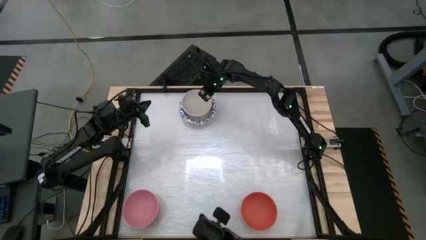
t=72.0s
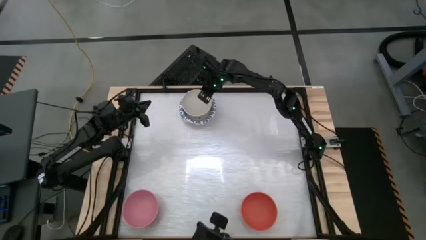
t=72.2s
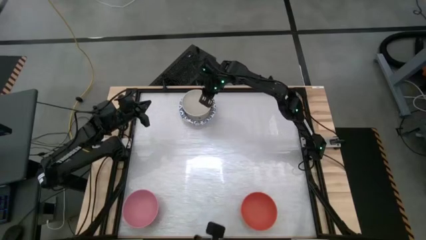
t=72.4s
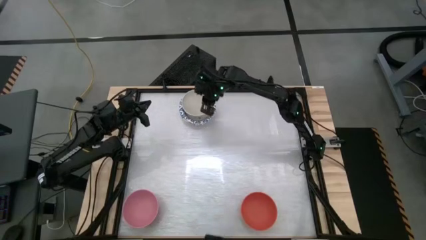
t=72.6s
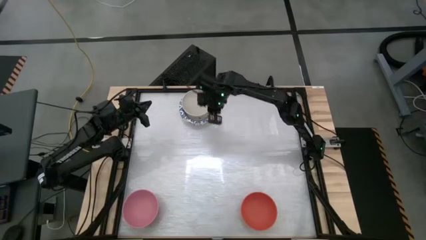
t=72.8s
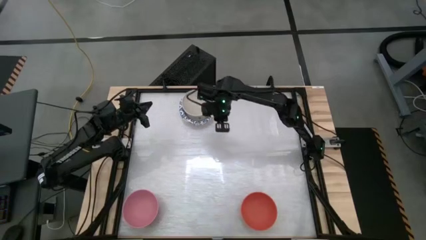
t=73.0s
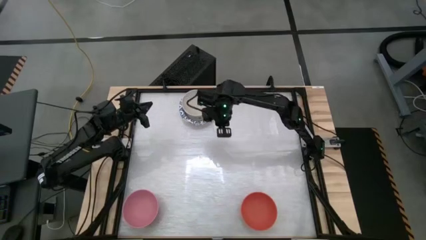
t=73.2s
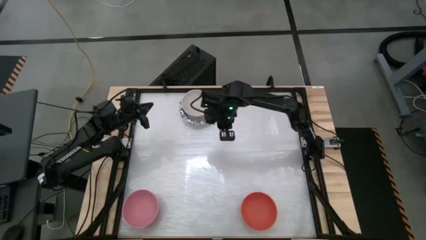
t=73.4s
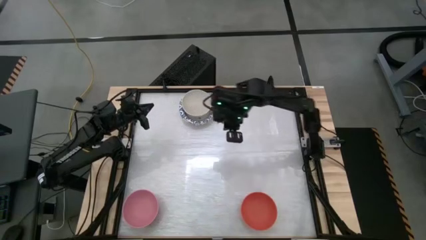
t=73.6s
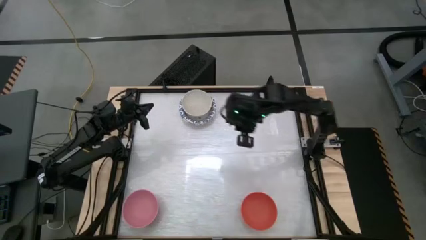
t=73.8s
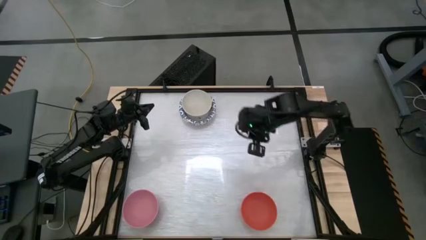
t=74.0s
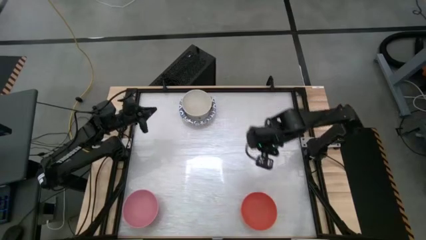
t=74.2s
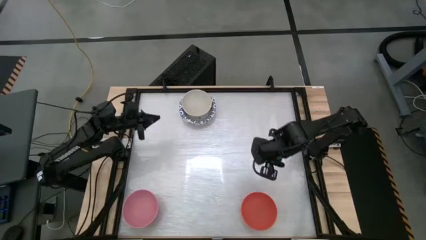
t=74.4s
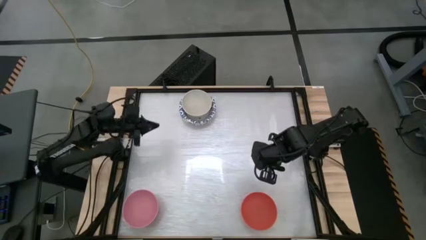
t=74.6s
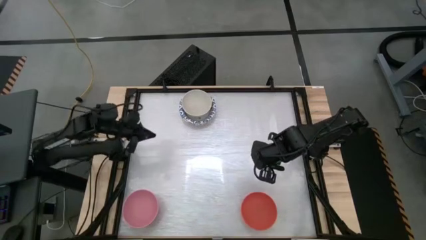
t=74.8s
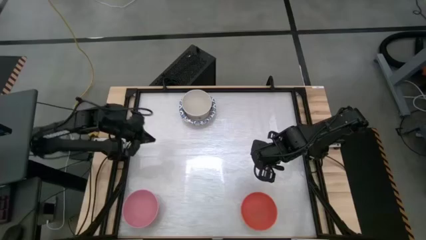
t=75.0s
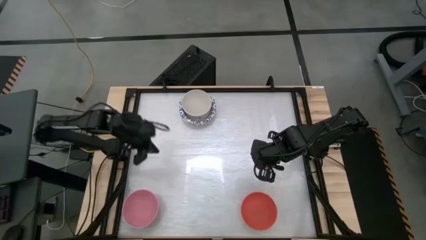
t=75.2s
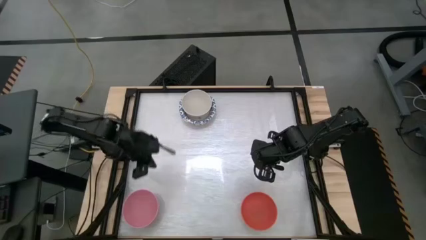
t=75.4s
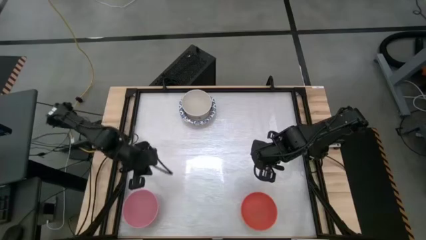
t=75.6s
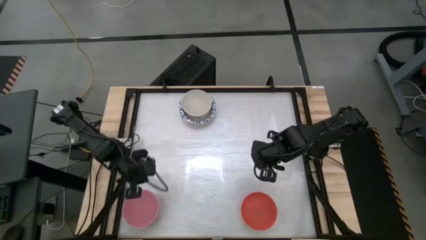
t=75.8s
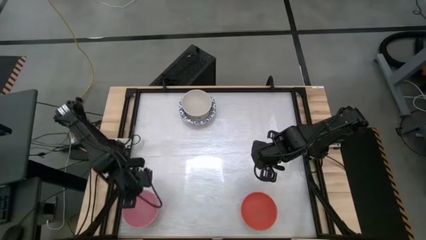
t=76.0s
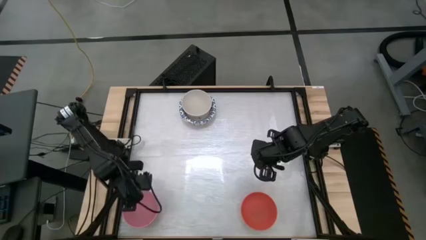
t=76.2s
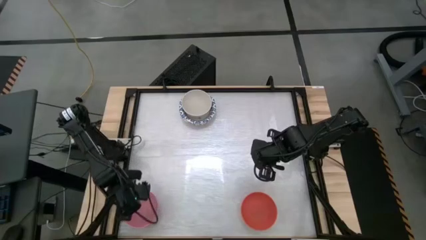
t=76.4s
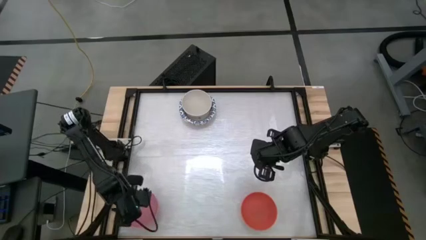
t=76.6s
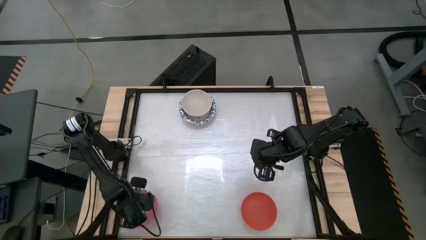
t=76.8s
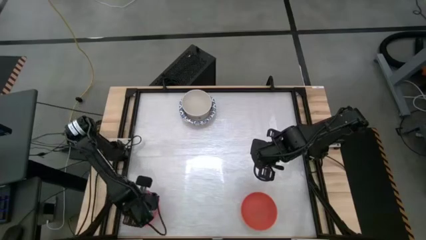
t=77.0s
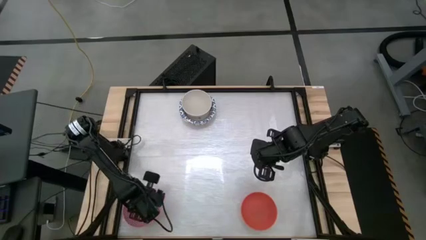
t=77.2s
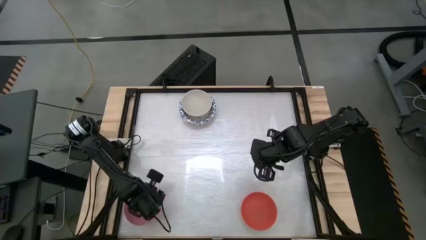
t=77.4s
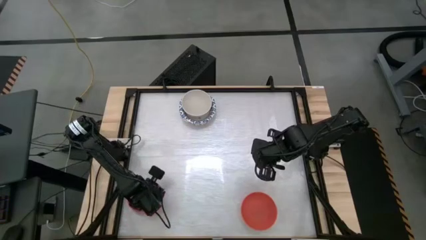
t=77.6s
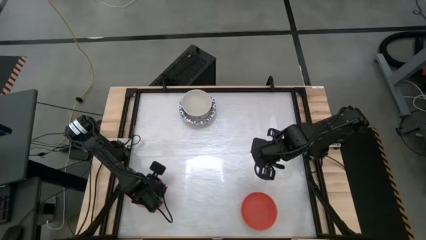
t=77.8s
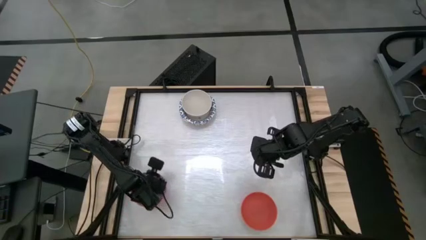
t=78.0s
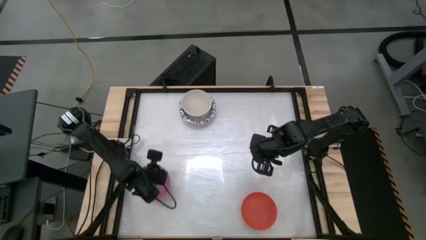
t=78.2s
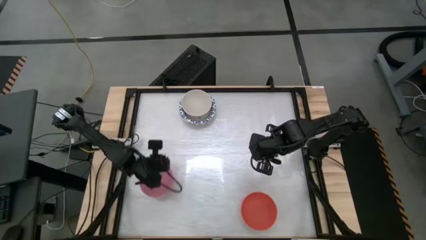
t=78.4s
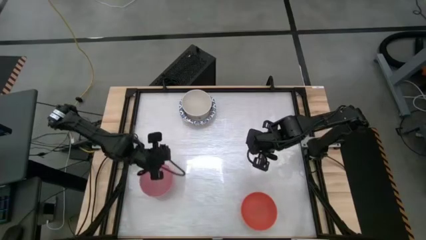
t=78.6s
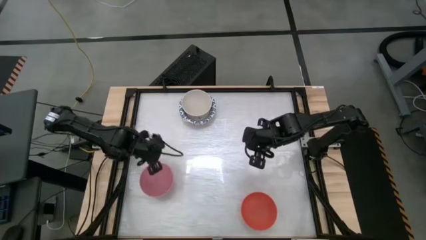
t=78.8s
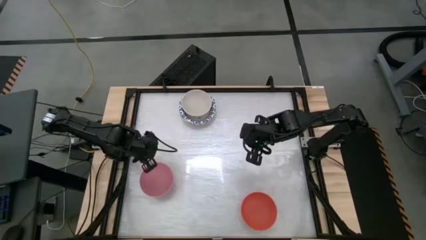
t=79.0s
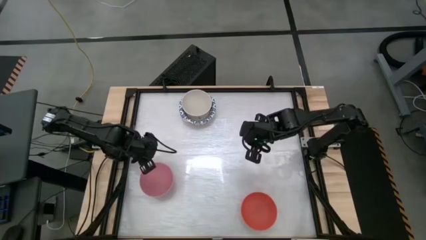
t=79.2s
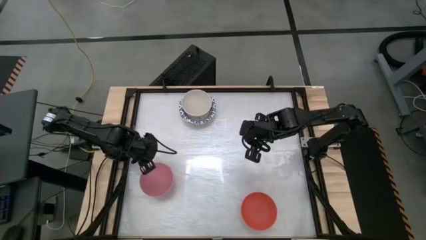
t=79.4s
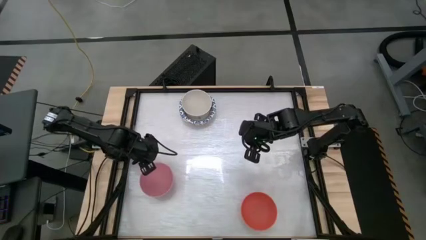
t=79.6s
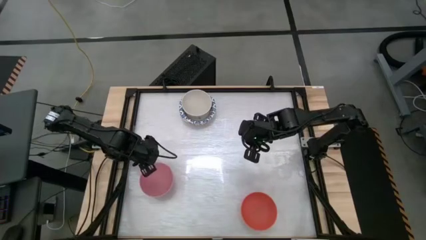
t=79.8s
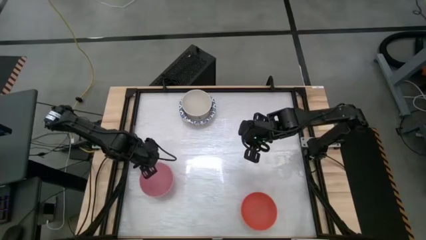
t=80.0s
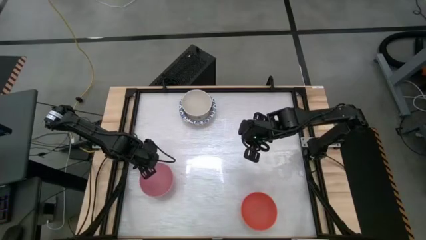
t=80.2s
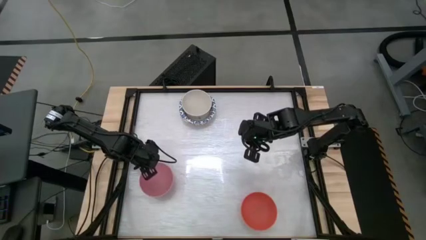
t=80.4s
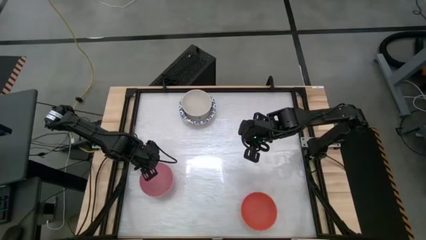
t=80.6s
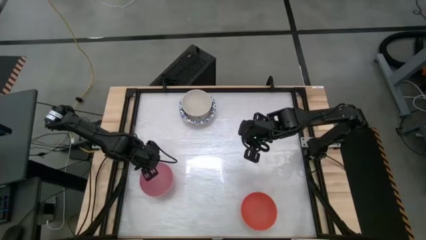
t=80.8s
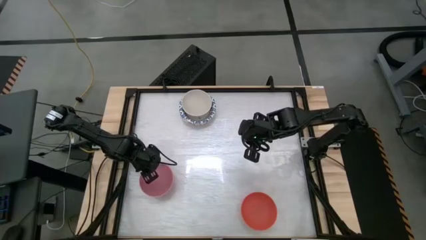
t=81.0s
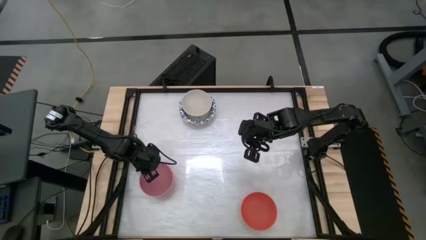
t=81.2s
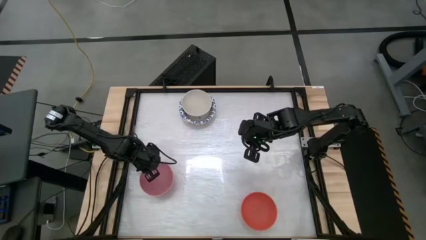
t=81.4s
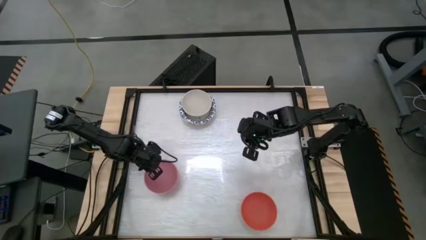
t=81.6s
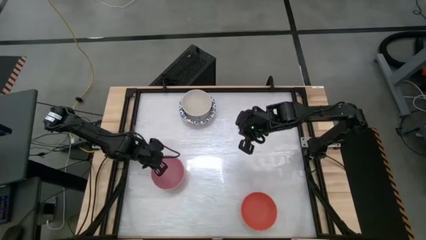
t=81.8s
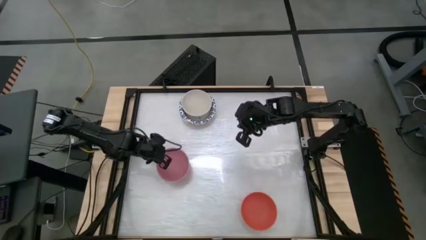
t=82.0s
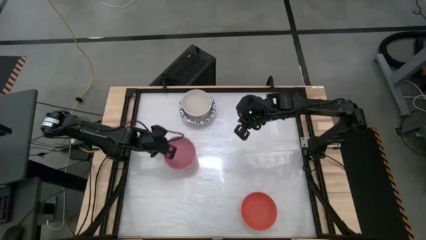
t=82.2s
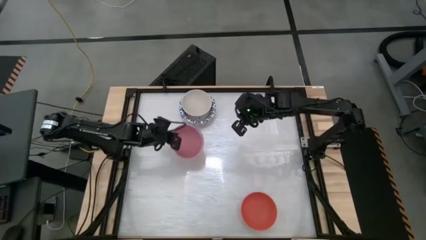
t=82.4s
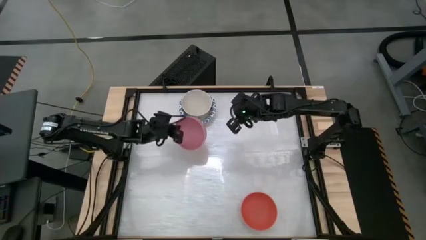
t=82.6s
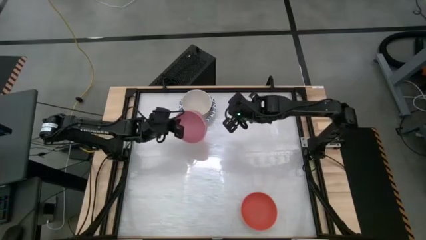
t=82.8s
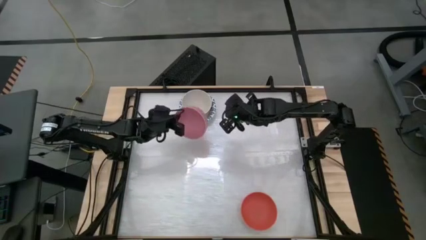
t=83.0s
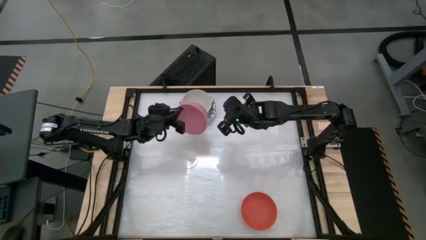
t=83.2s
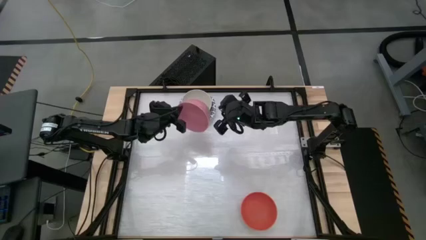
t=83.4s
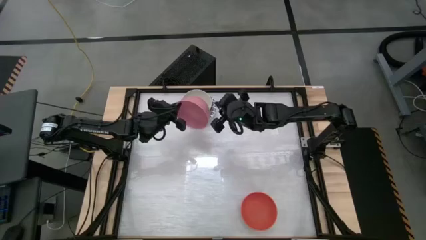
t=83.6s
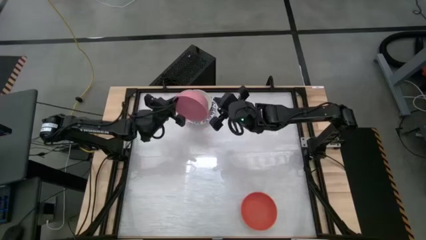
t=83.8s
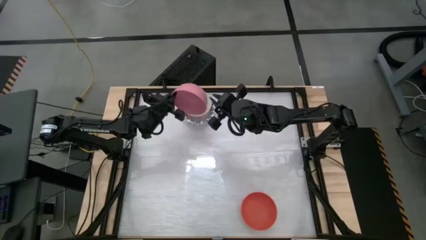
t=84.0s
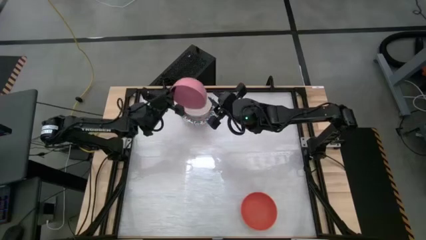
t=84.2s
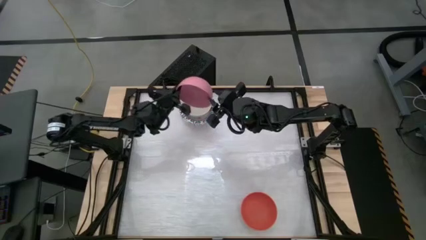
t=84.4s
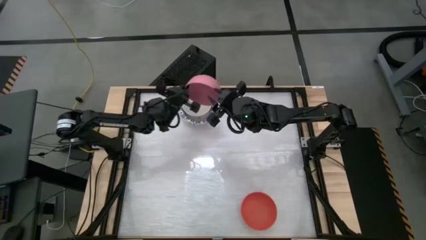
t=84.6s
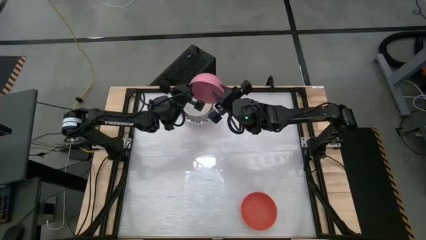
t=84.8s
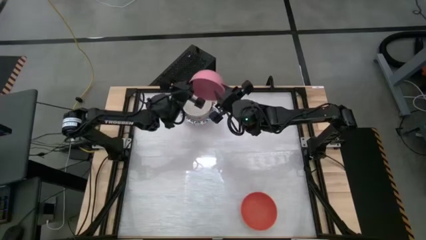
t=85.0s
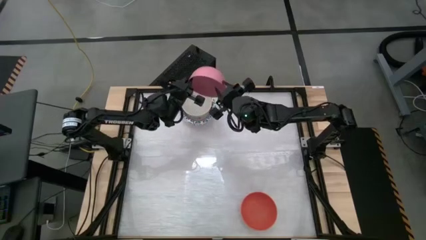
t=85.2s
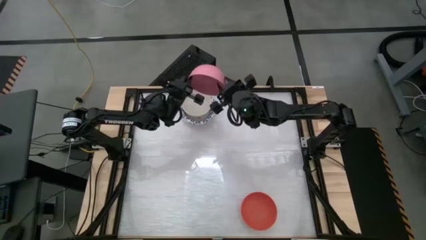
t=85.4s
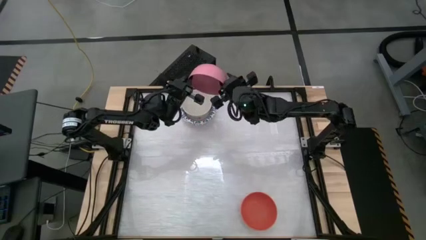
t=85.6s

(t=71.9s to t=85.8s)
Stack the pink bowl on top of the white bowl
